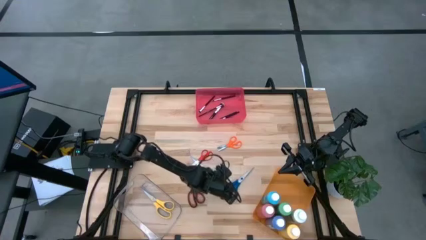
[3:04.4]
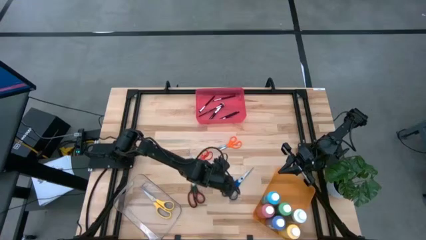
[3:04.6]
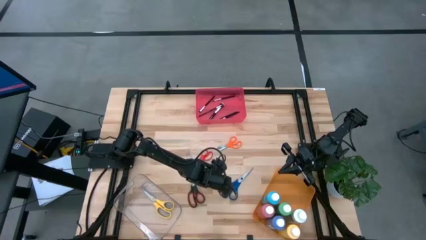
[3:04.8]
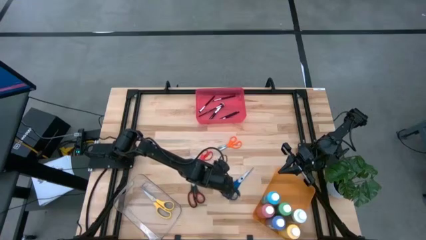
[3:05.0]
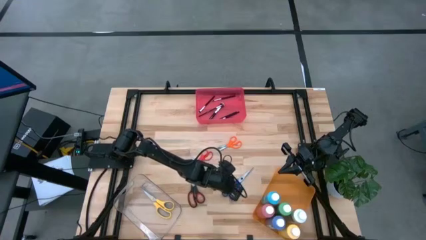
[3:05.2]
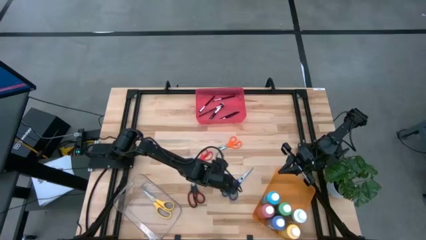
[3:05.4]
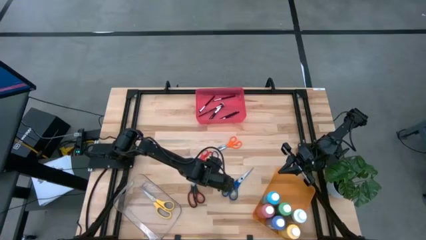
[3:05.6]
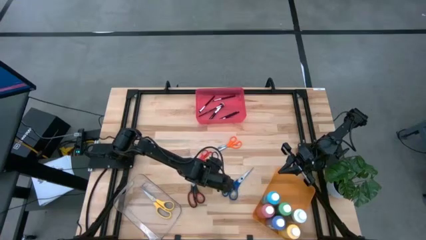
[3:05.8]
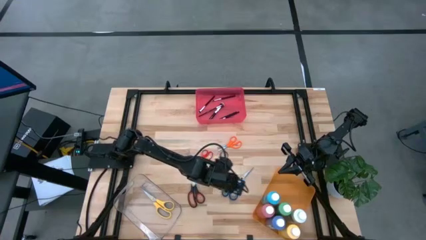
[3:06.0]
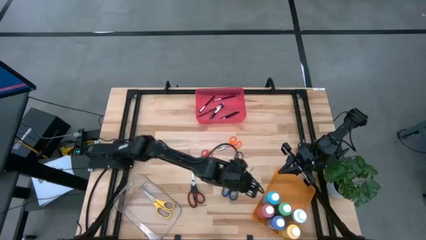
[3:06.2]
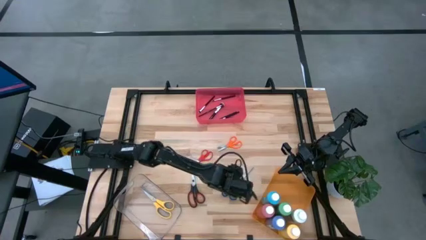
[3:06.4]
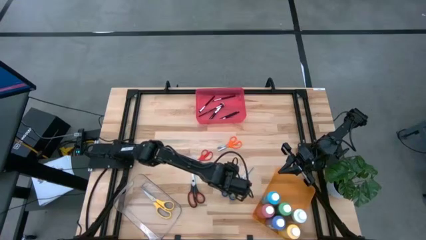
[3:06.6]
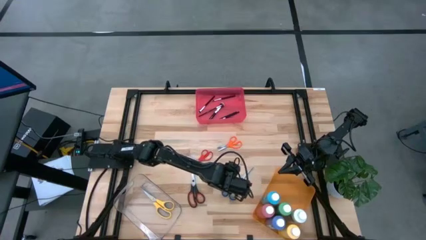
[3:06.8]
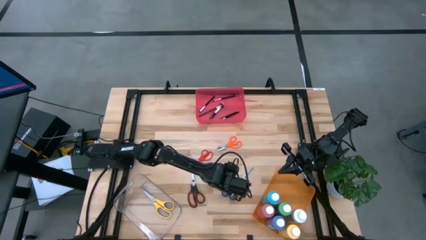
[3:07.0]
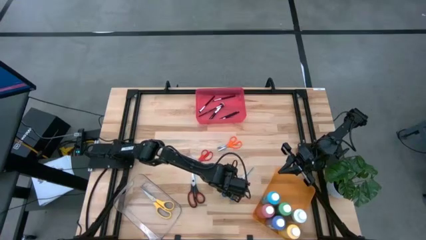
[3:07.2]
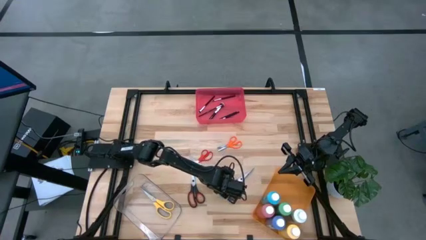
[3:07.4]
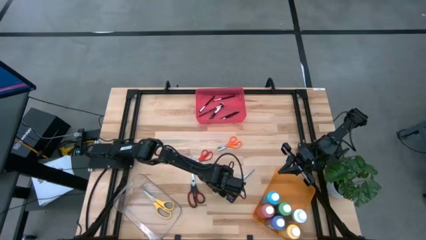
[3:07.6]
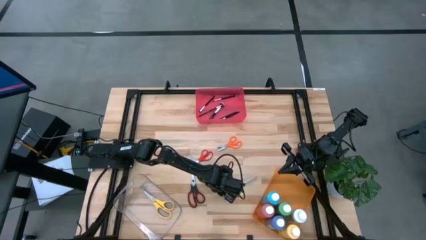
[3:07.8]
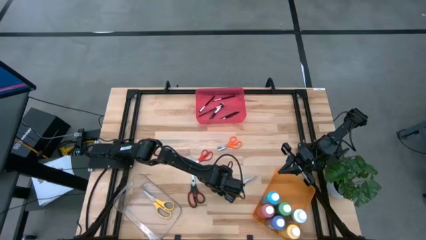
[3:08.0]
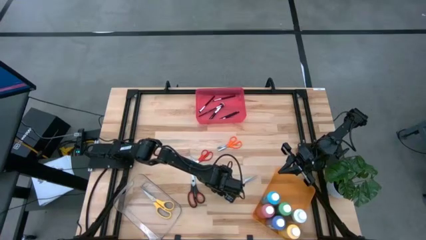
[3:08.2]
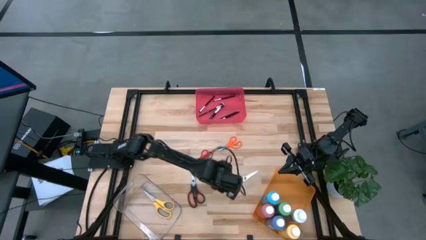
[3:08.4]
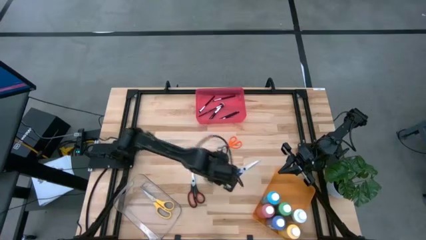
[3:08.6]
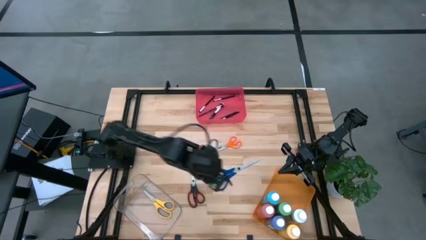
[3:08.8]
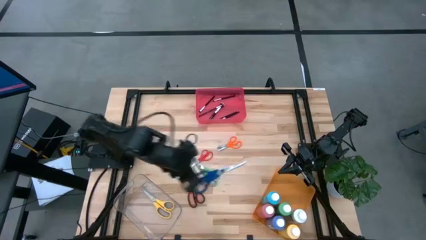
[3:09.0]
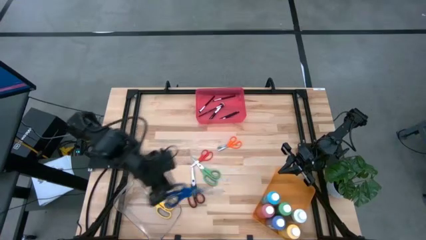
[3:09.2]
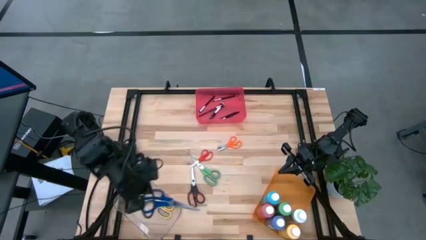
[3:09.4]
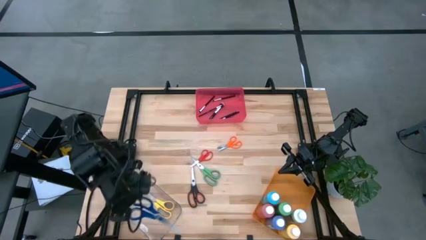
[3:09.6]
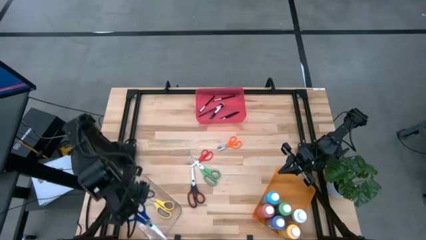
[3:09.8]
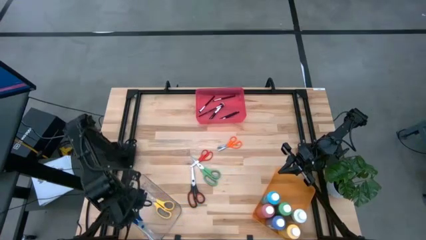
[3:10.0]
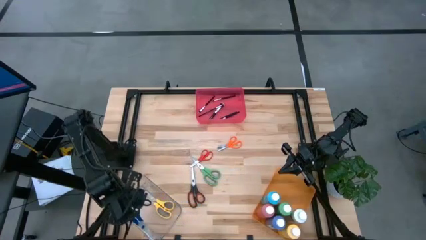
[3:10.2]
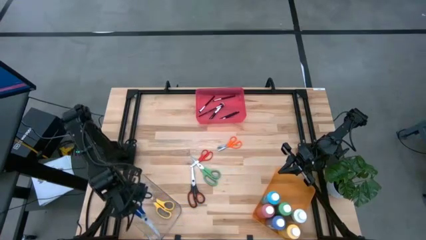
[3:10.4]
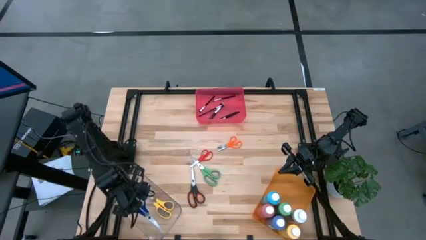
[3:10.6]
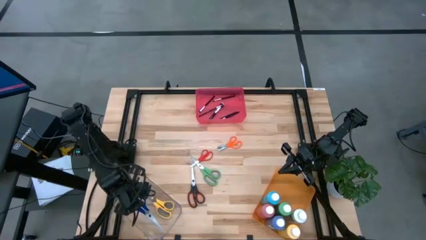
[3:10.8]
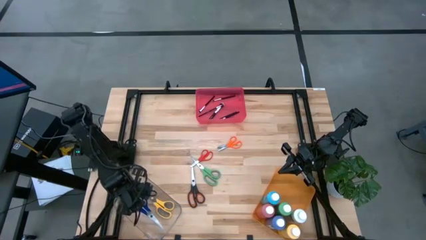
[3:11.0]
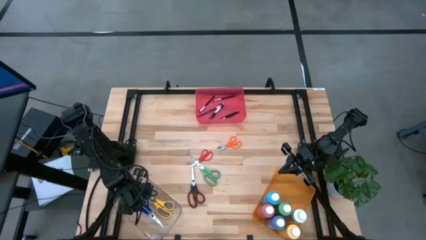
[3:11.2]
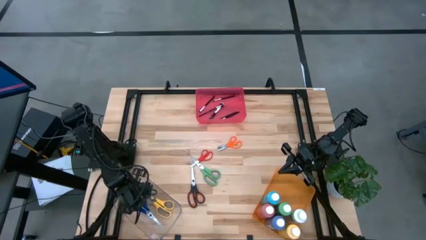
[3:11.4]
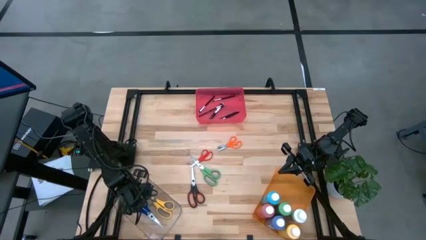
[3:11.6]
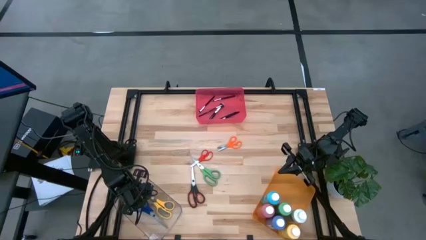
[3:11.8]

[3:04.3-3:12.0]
Task: Pick & Place Paint Supplies
Put the blue scissors into the transparent bin

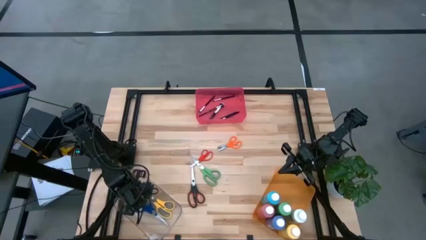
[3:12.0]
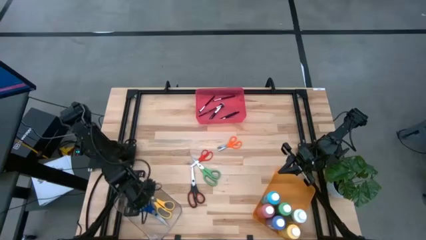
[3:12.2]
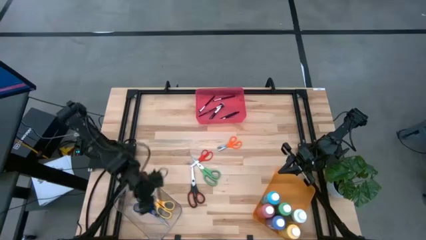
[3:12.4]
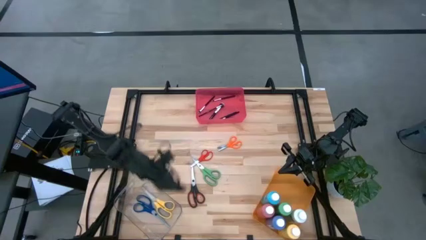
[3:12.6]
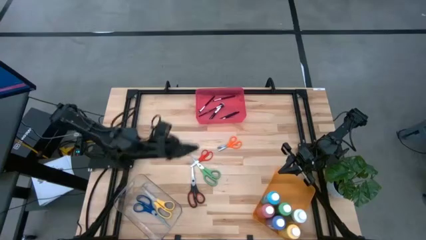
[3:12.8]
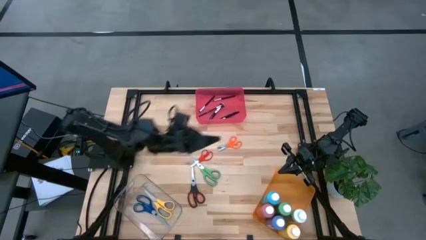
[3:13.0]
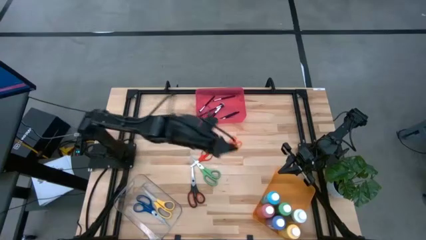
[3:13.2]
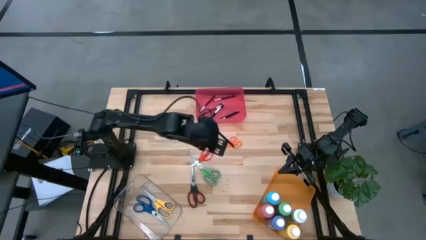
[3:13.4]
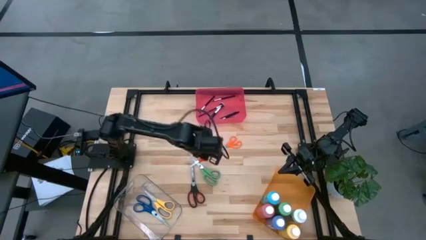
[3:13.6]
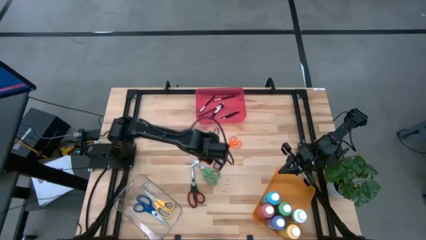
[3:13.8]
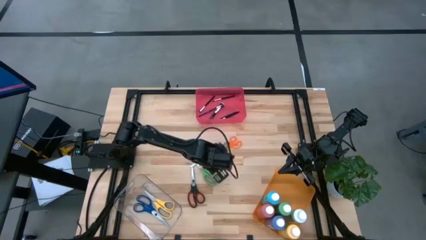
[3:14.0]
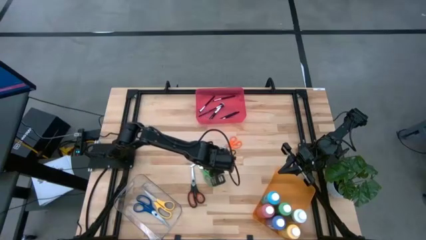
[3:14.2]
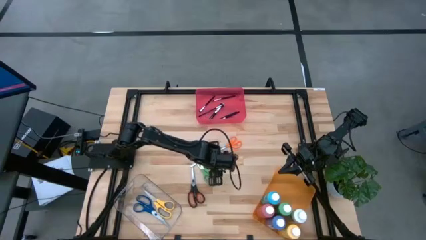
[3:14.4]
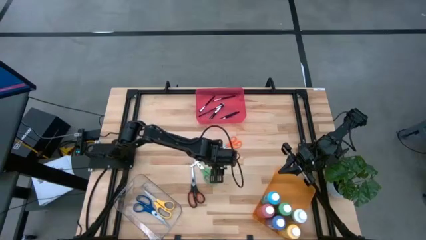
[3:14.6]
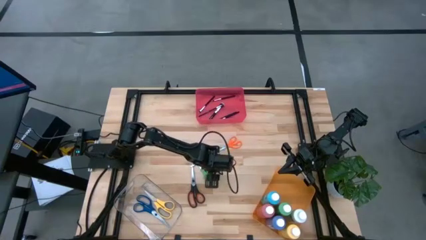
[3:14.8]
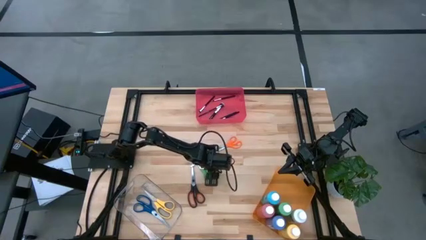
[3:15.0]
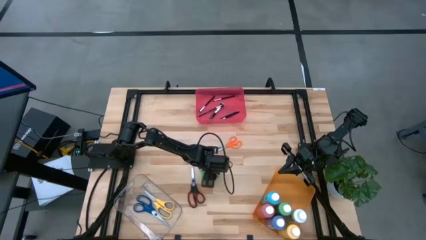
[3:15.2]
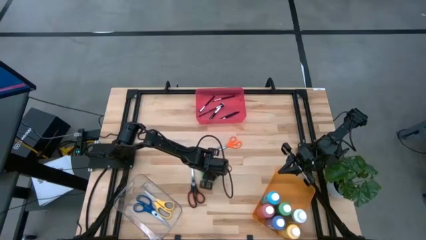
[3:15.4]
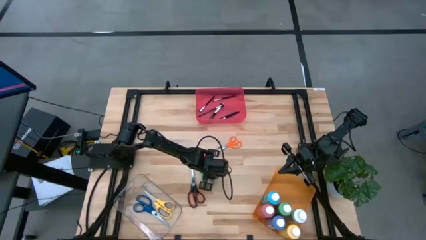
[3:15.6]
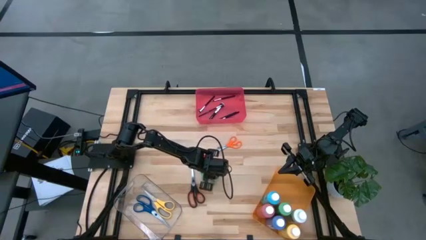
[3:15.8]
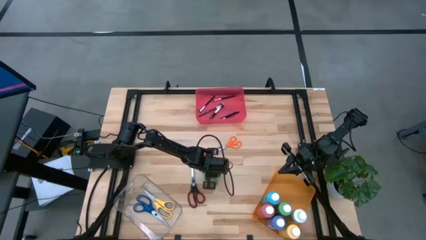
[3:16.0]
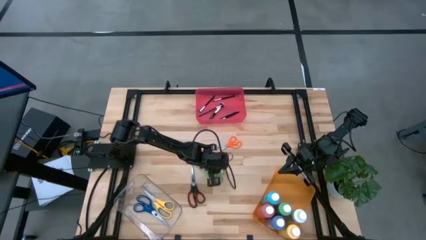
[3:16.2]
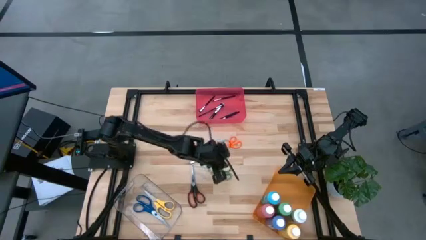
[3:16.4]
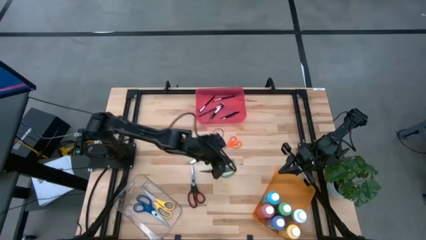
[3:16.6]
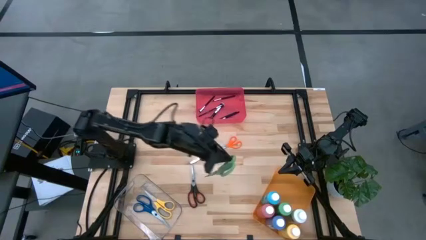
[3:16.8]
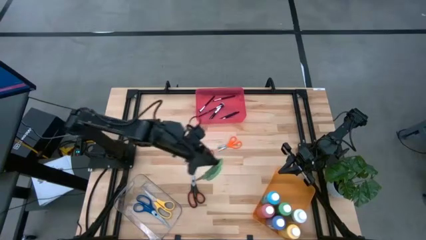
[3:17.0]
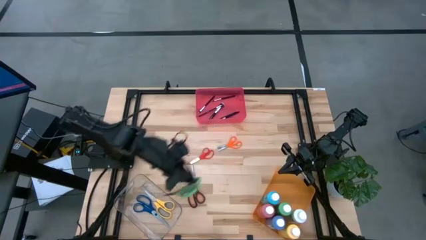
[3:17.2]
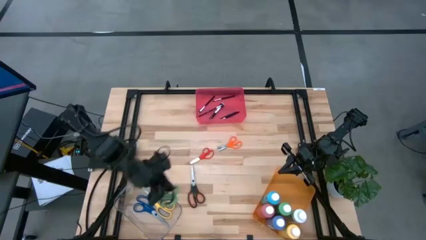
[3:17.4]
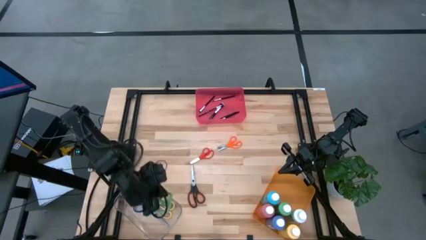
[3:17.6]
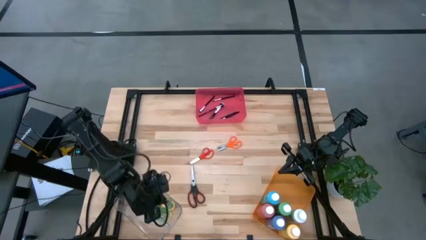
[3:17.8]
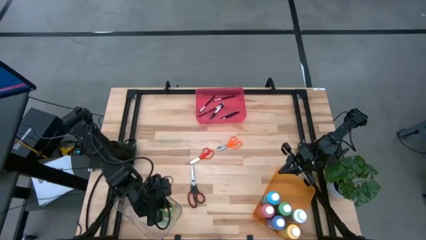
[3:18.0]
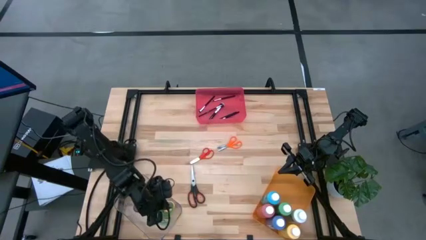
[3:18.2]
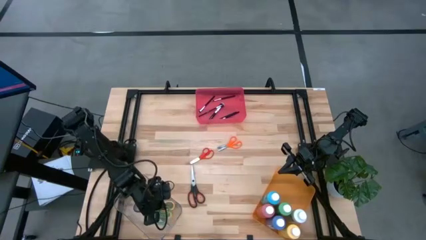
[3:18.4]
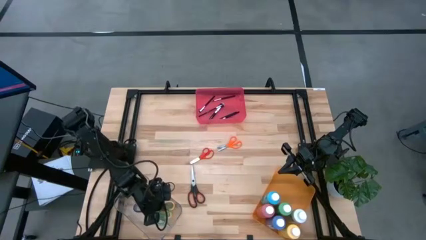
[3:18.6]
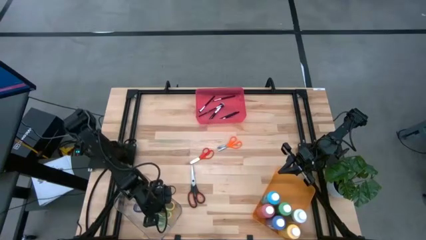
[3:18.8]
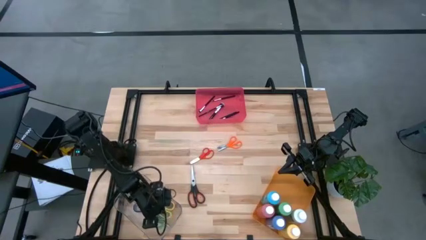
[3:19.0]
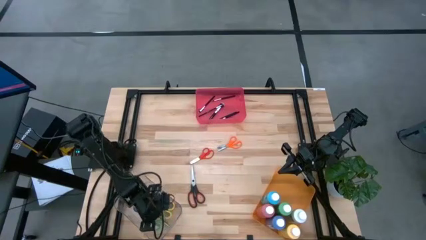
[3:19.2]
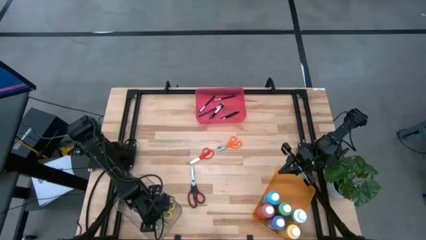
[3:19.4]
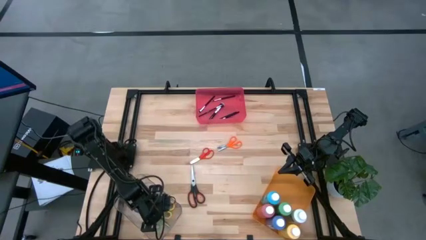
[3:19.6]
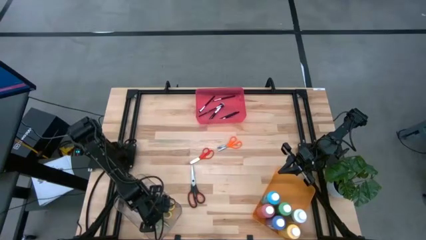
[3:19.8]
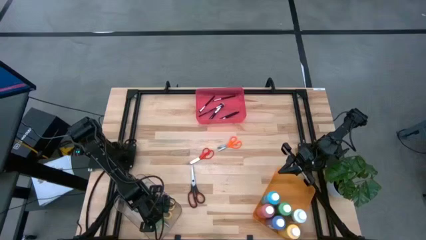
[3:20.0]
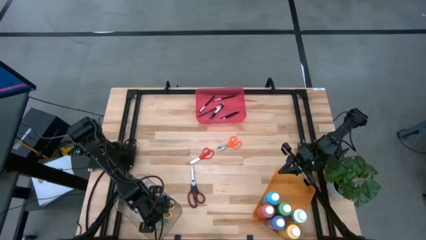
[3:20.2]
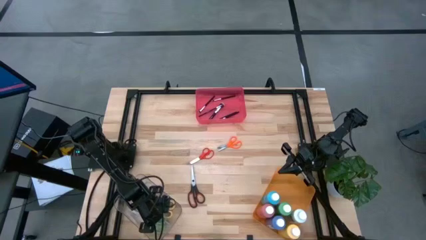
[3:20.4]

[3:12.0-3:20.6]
Put the green scissors into the transparent bin

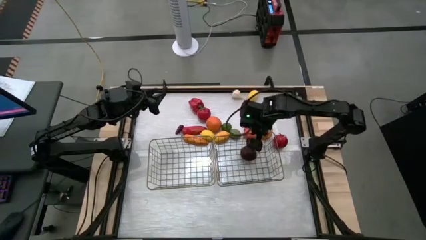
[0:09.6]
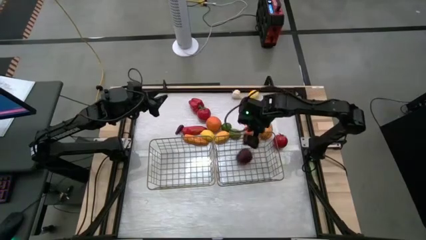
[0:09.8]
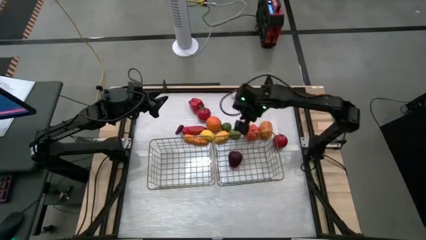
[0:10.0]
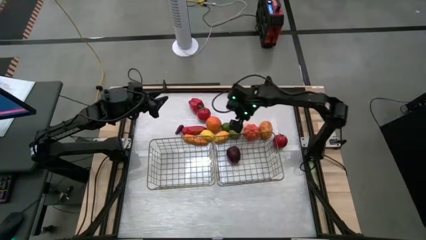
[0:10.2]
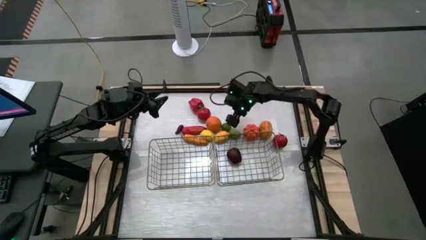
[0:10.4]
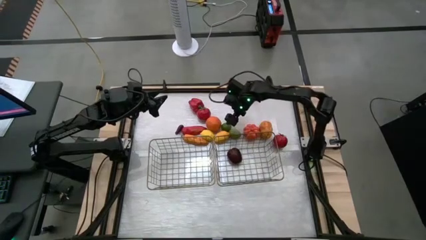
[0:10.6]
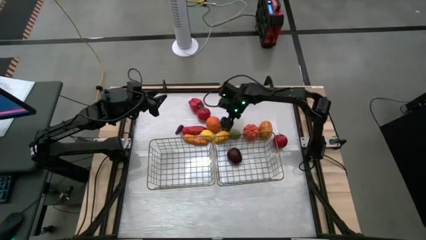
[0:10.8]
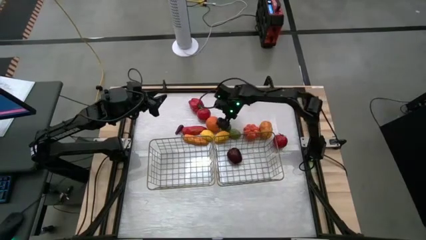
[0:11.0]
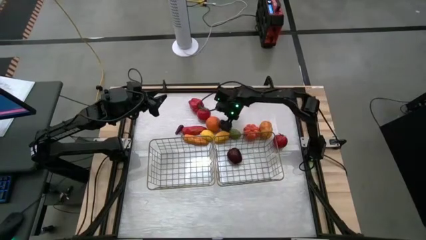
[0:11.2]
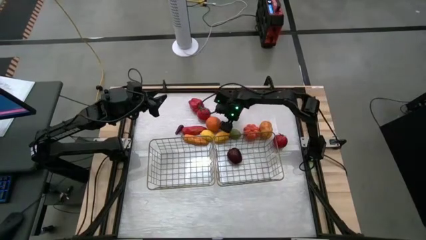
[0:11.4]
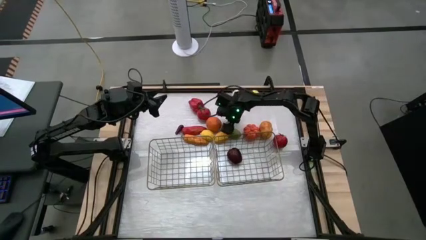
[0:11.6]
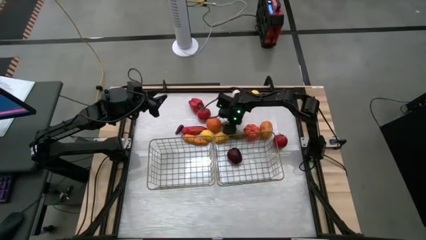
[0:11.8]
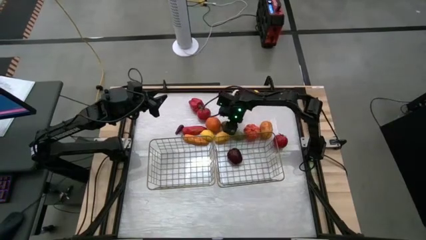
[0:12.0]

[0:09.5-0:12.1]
Task: Sort produce into baskets
Put the top lime into the right wire basket
